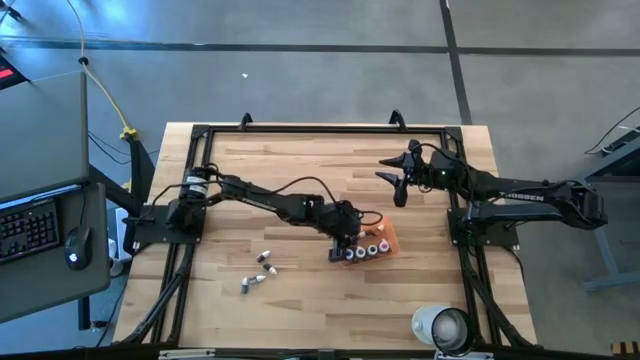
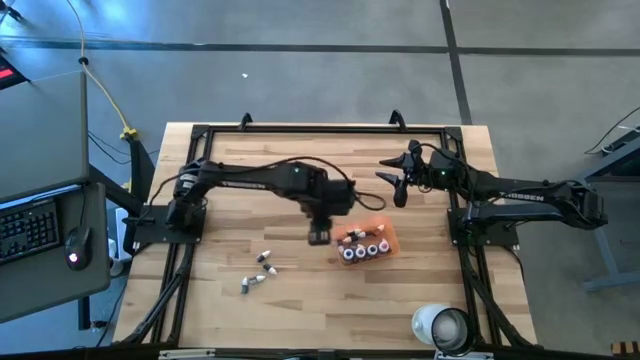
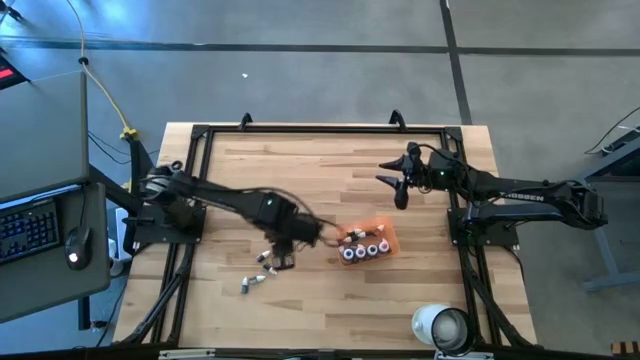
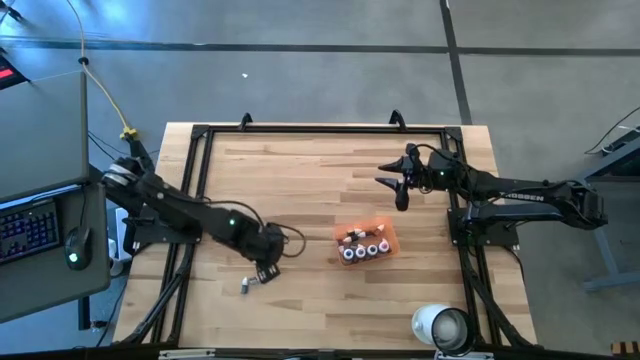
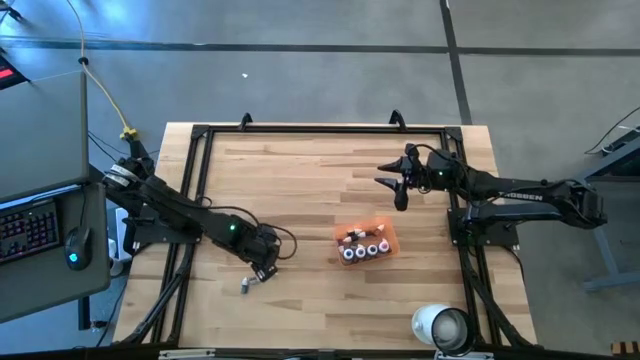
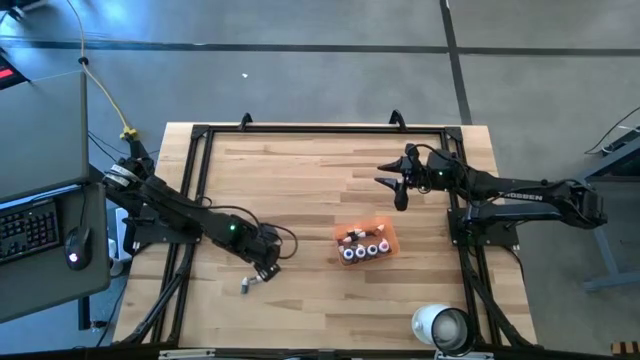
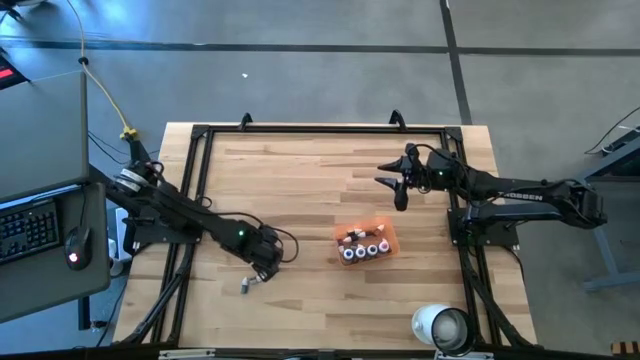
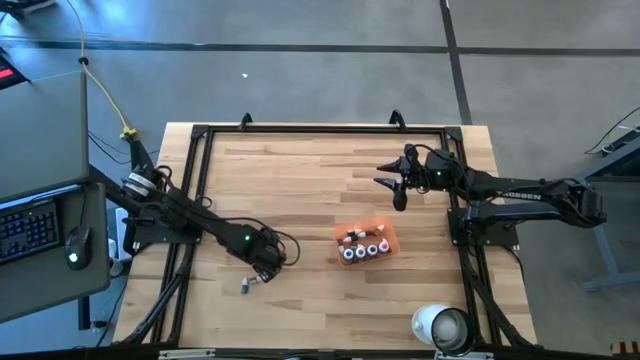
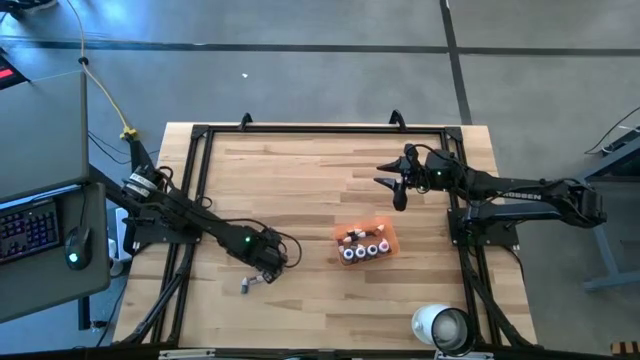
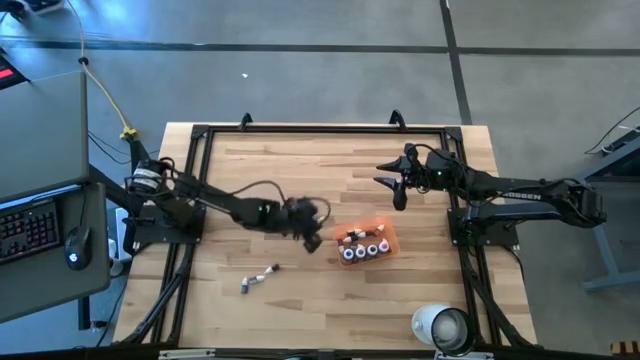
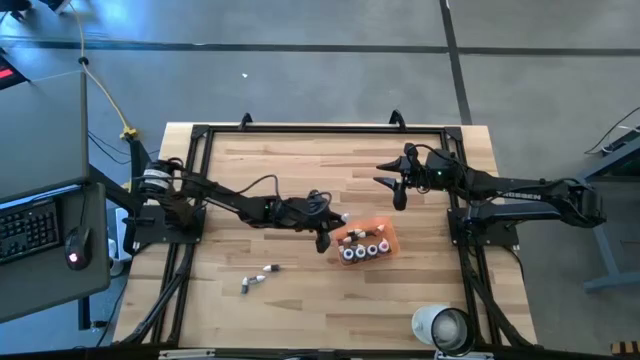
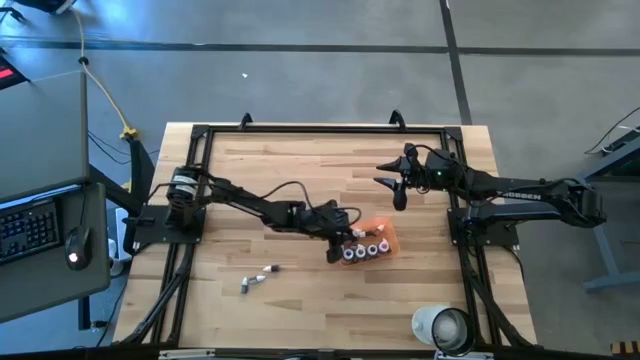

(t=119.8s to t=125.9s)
Task: Pick & Place food coloring
Put the small orange food coloring bottle into the orange bin

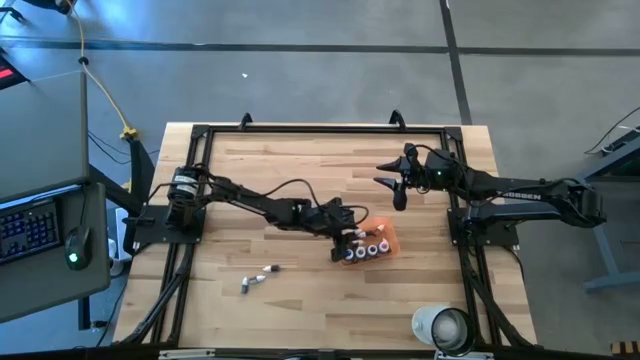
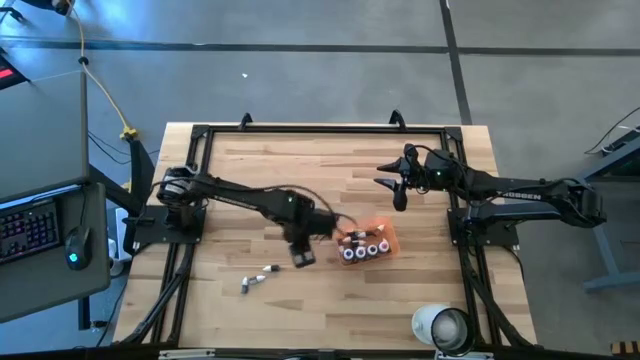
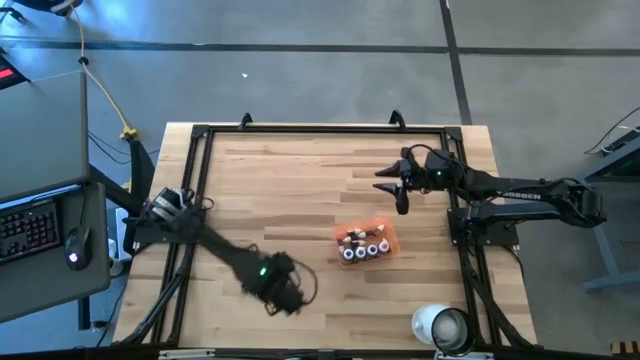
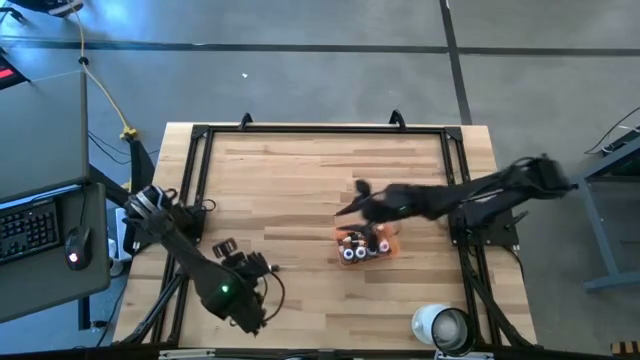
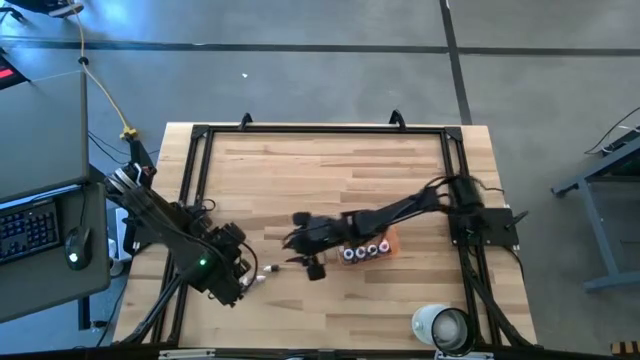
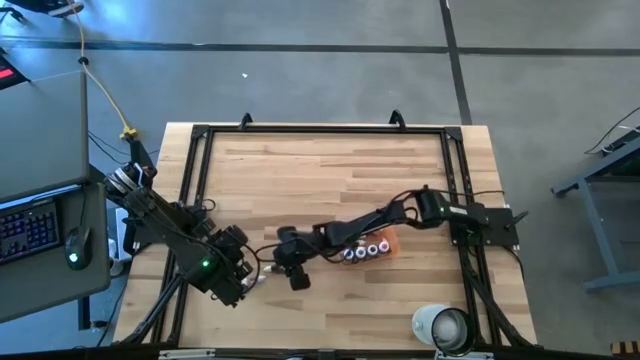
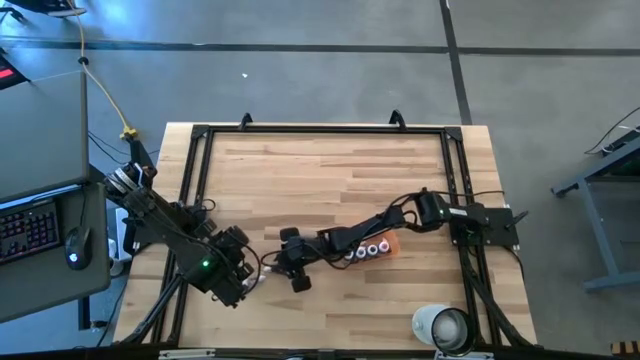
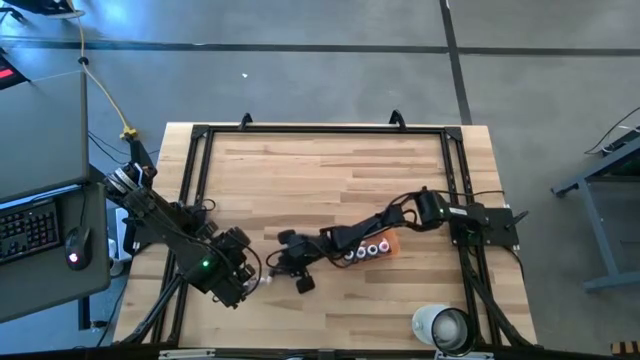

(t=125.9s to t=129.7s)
Put the small green food coloring bottle into the orange bin

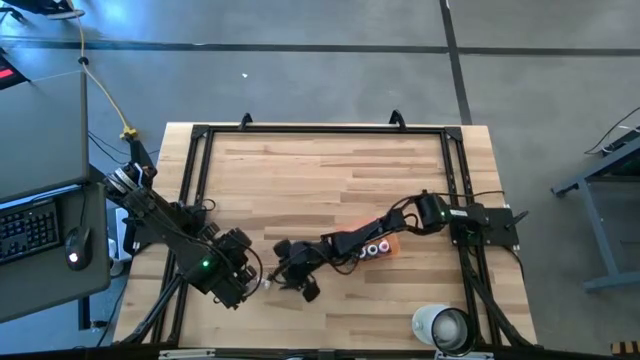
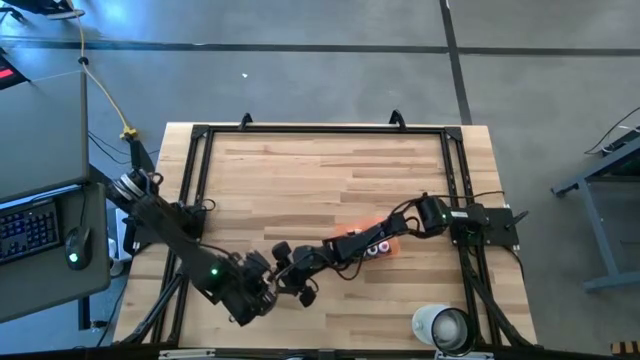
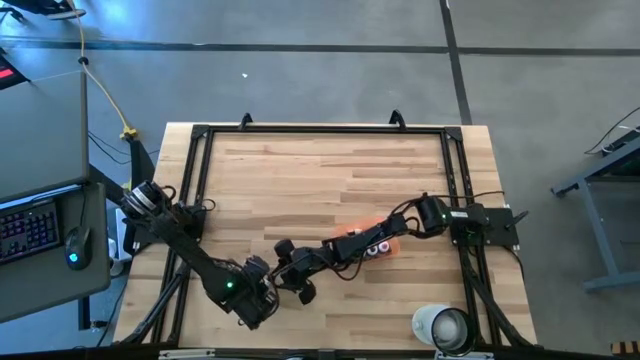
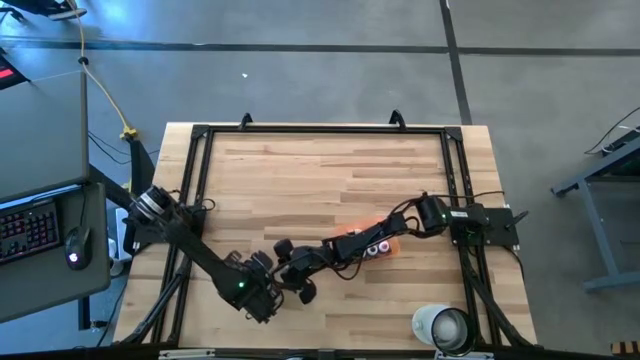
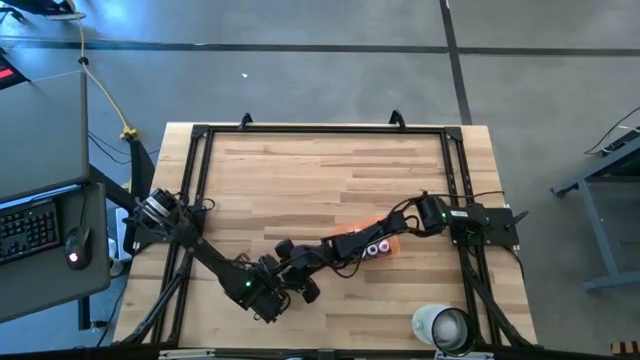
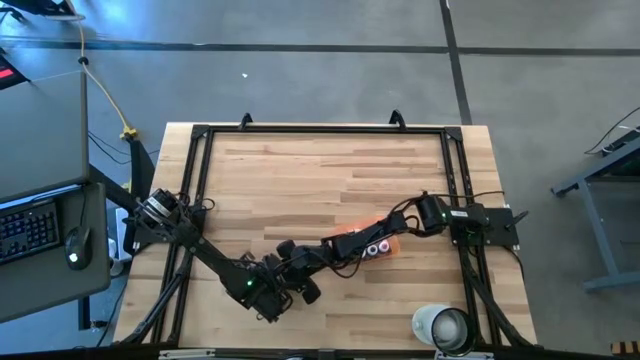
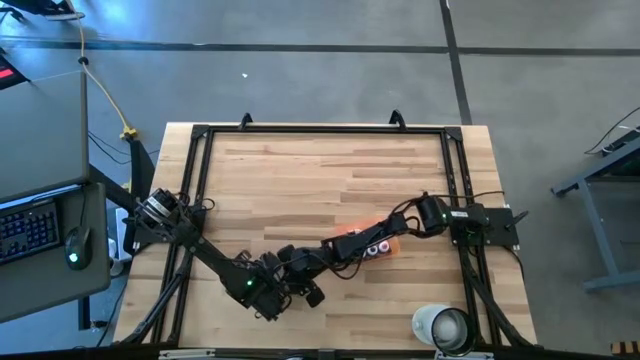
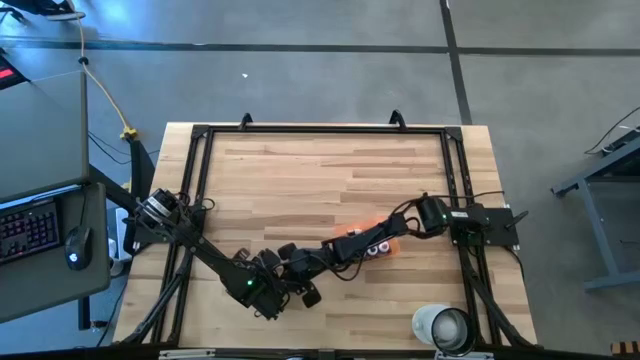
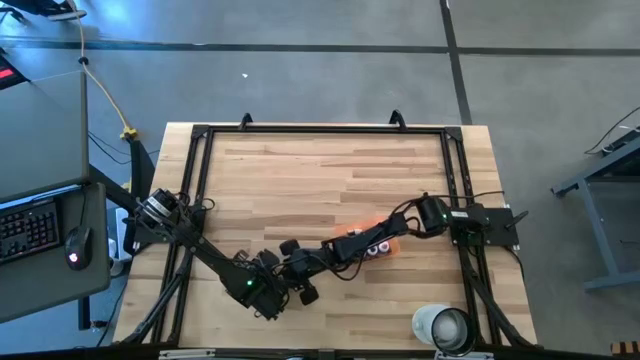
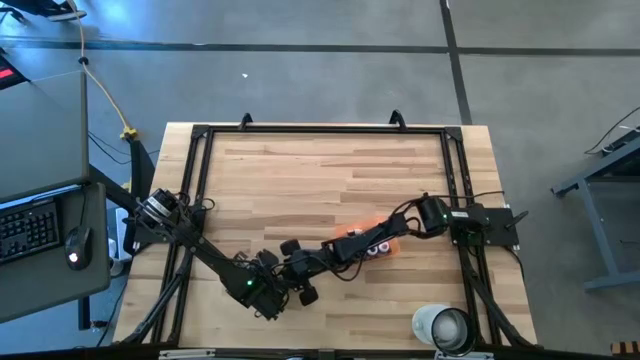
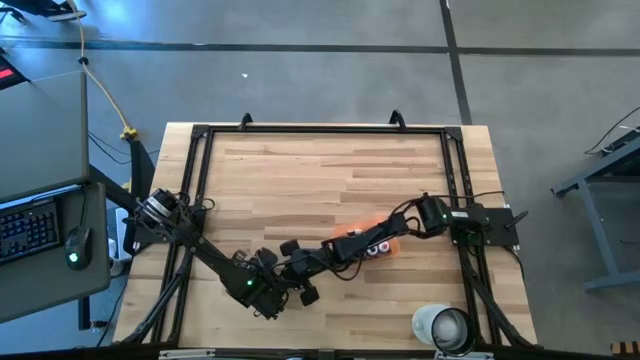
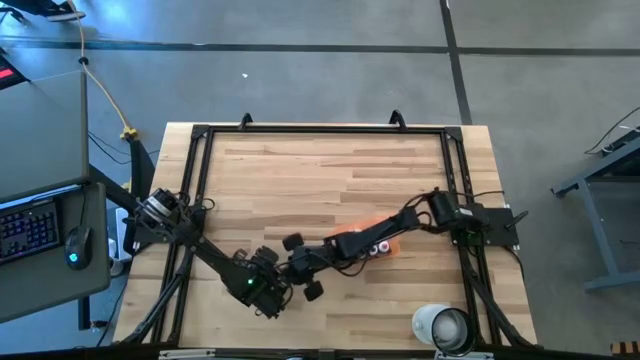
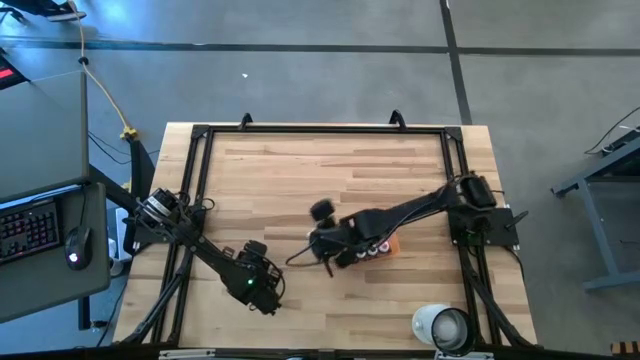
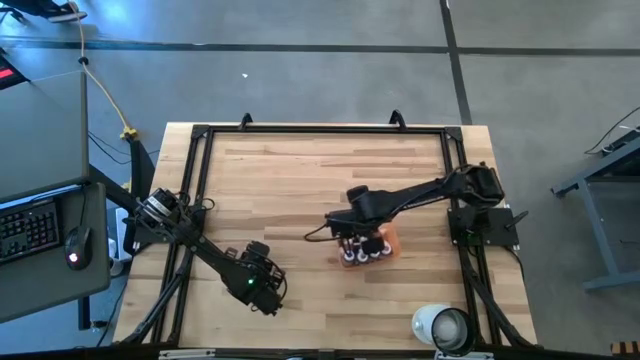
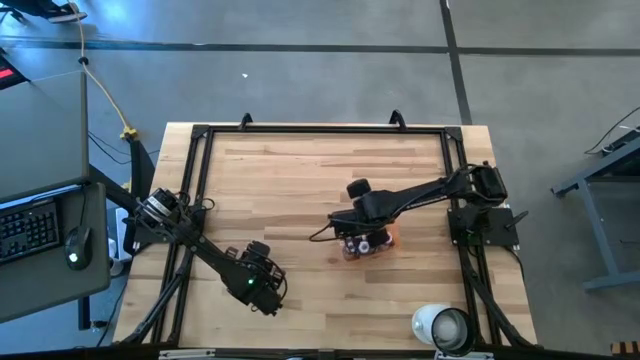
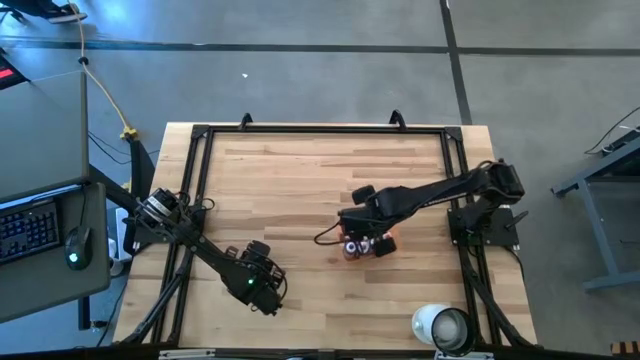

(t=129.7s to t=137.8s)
Put the small green food coloring bottle into the orange bin

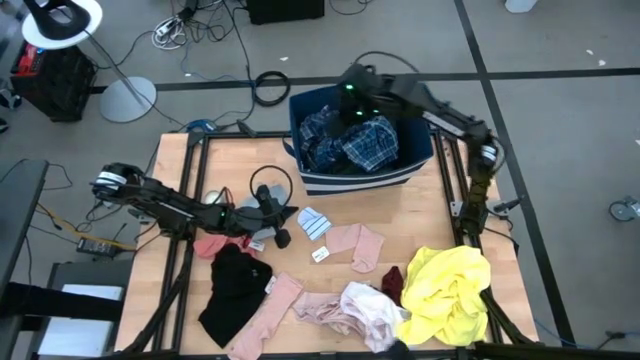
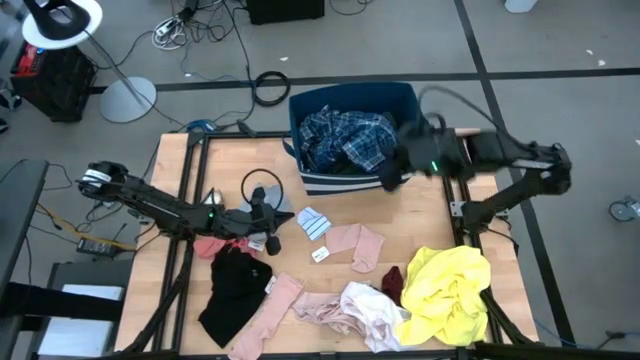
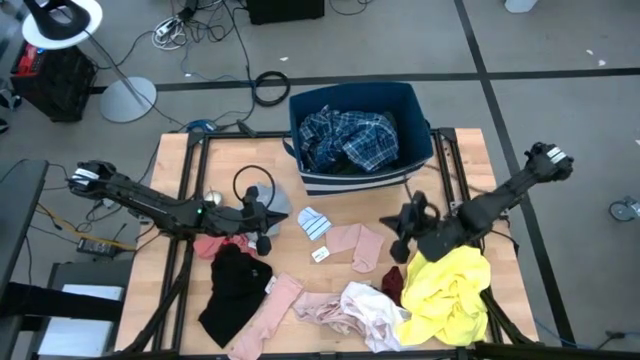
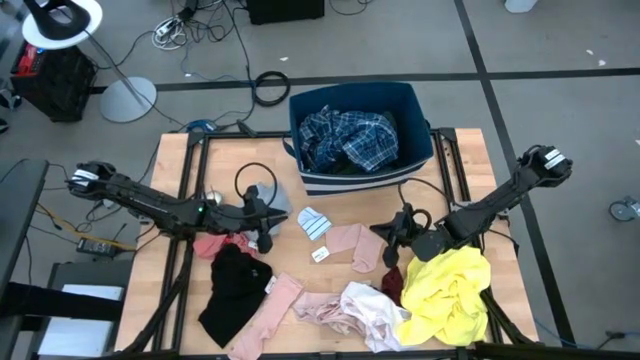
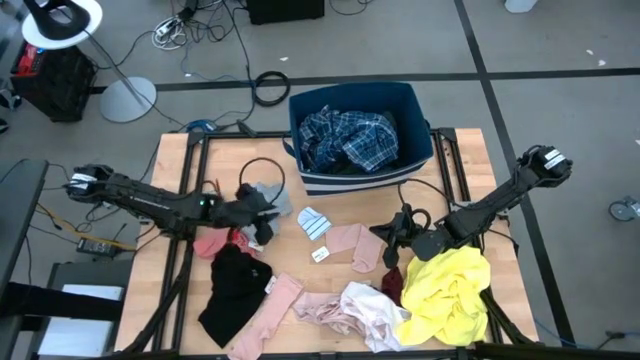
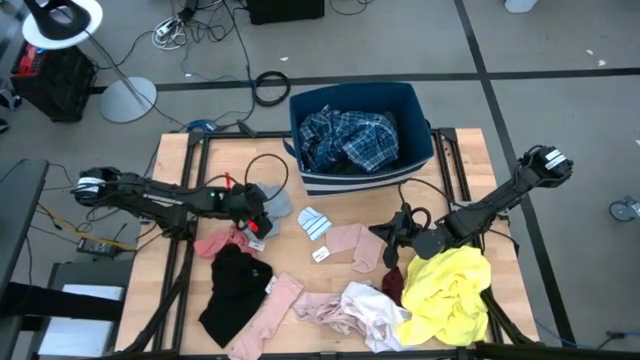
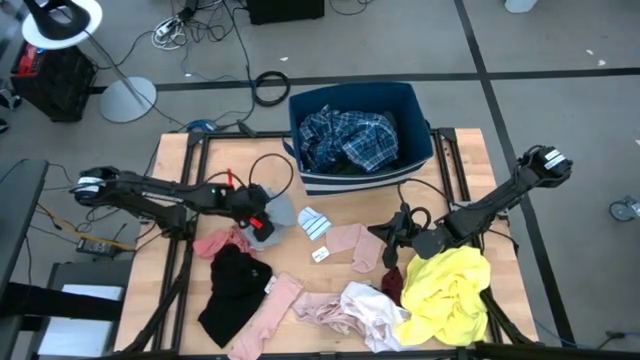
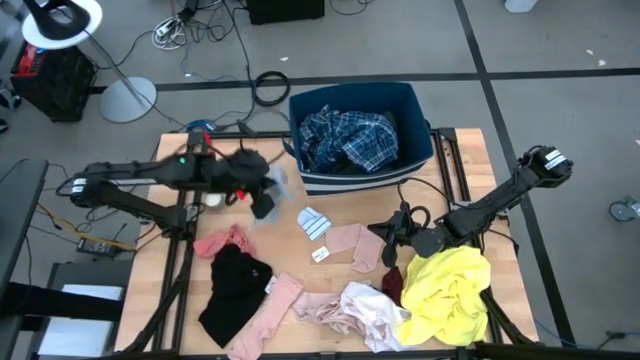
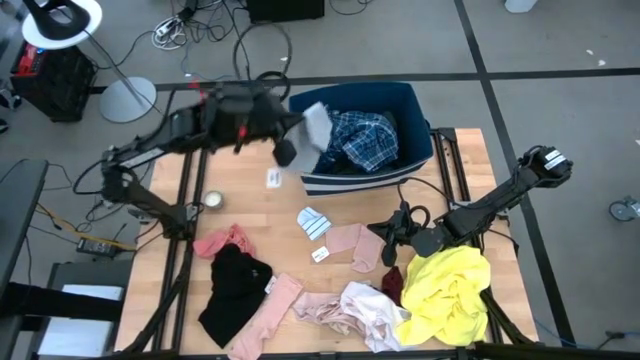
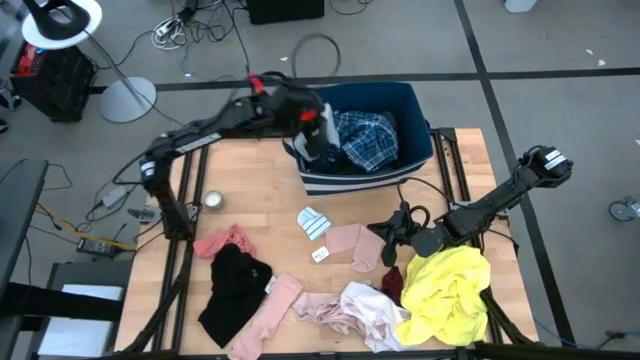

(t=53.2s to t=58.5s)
Task: Sort clothes
Put the gray sock into the blue laundry bin
